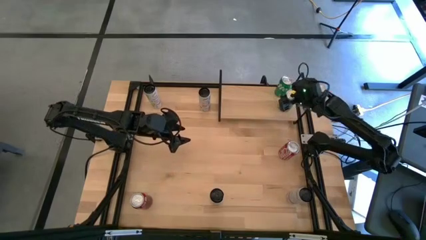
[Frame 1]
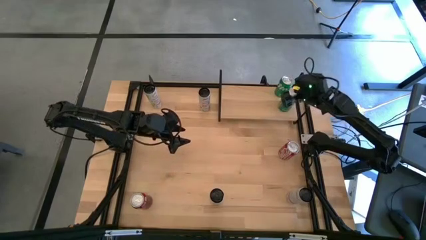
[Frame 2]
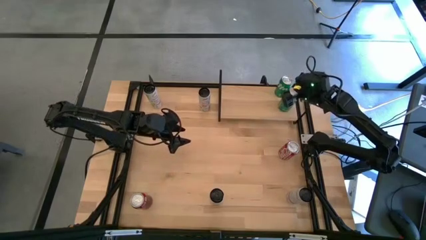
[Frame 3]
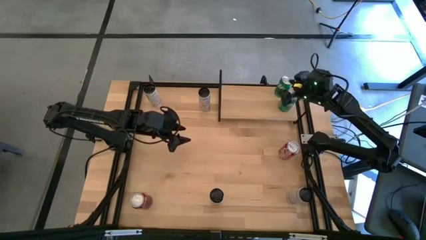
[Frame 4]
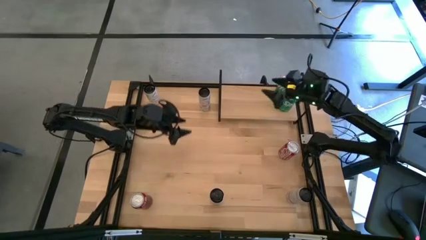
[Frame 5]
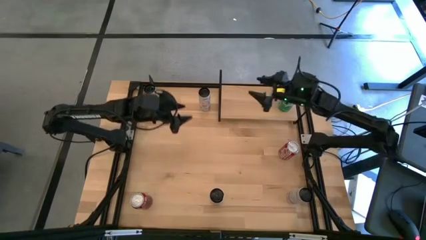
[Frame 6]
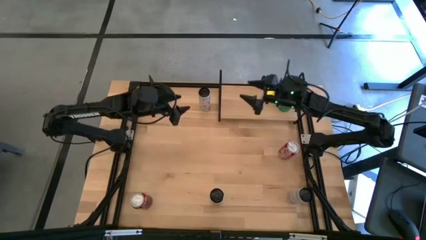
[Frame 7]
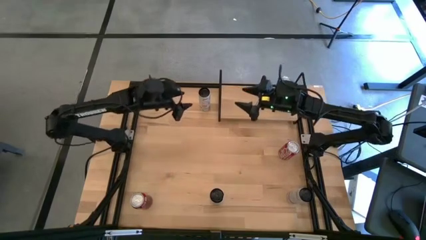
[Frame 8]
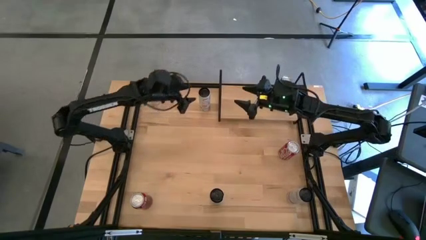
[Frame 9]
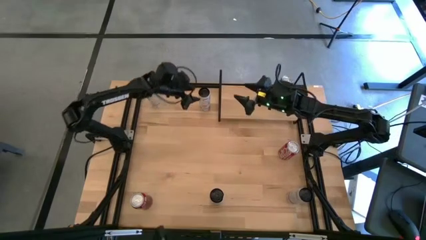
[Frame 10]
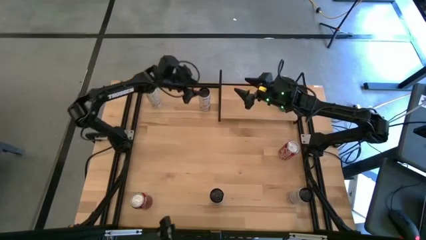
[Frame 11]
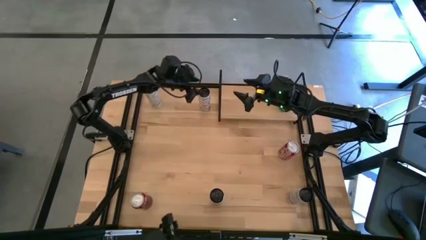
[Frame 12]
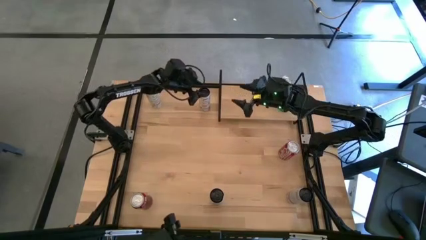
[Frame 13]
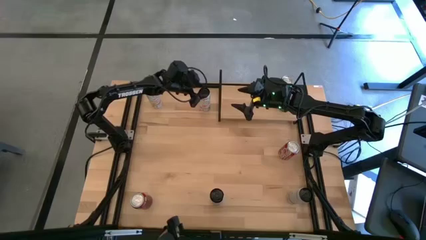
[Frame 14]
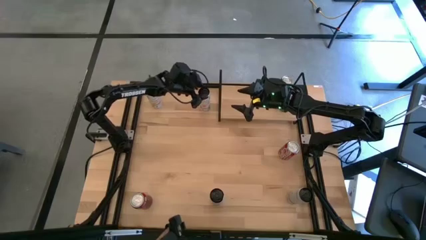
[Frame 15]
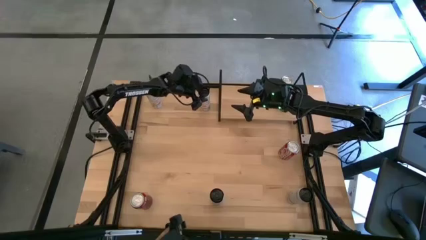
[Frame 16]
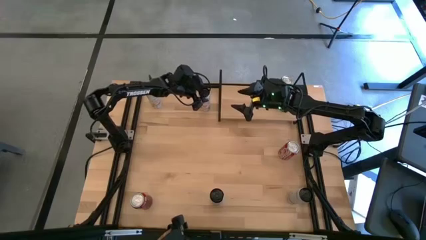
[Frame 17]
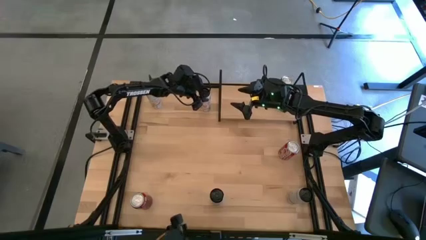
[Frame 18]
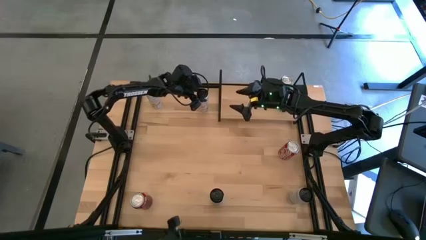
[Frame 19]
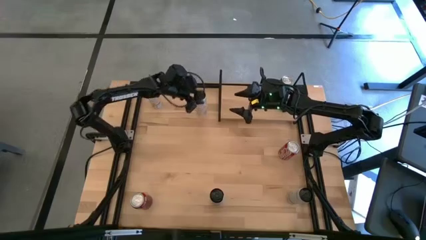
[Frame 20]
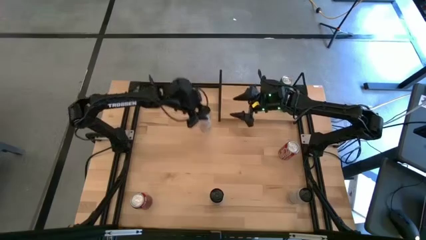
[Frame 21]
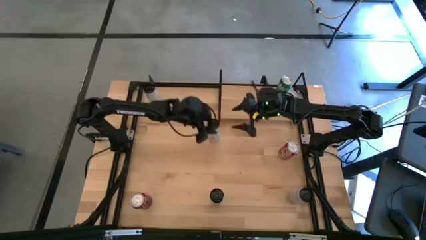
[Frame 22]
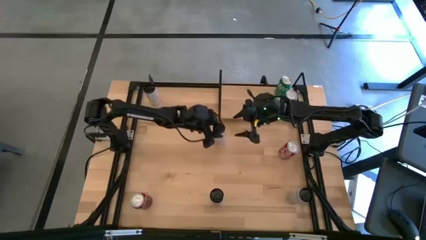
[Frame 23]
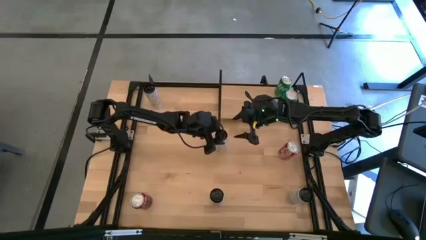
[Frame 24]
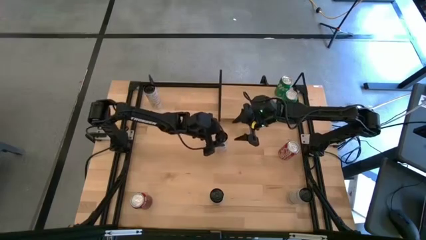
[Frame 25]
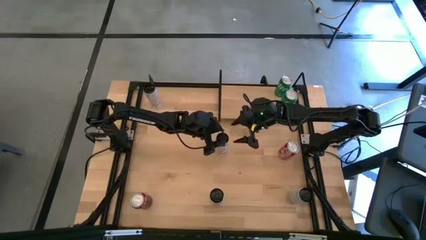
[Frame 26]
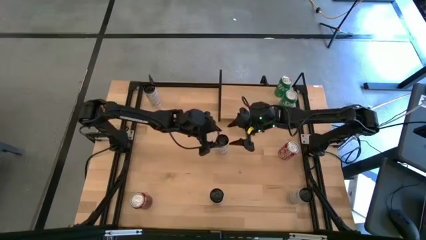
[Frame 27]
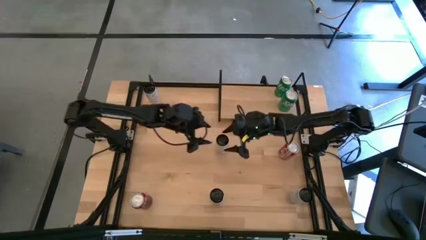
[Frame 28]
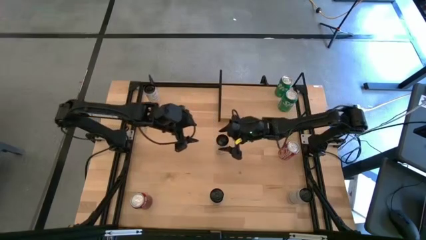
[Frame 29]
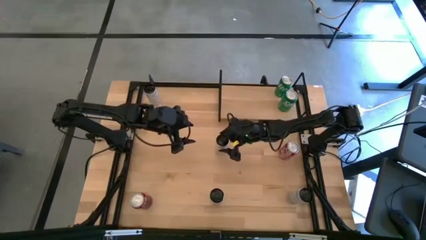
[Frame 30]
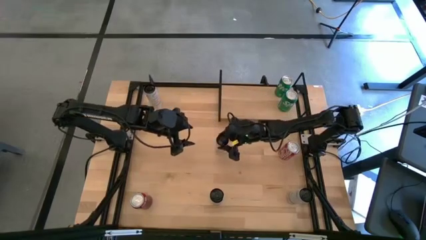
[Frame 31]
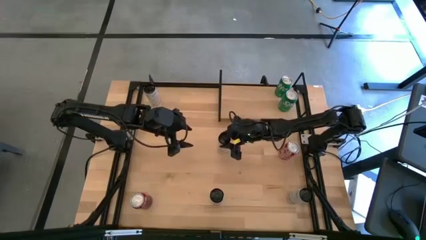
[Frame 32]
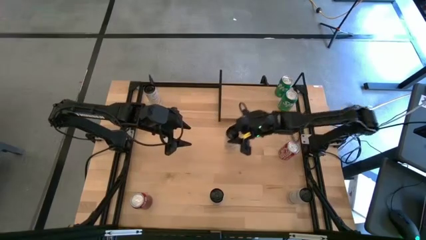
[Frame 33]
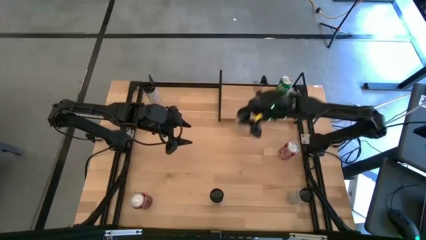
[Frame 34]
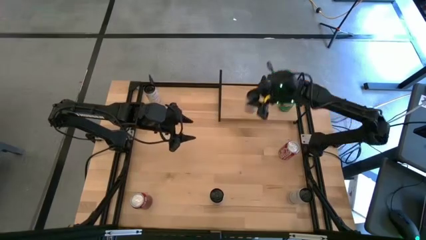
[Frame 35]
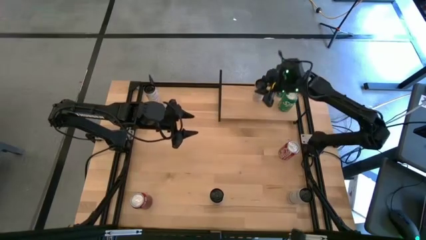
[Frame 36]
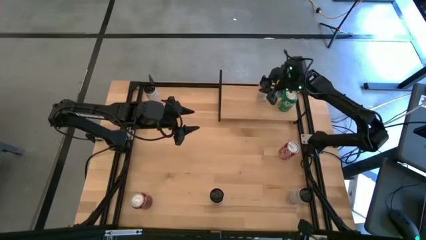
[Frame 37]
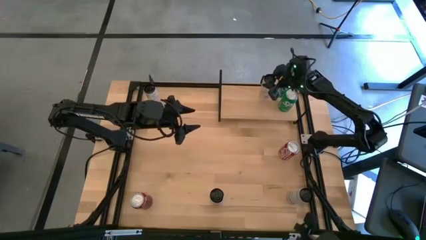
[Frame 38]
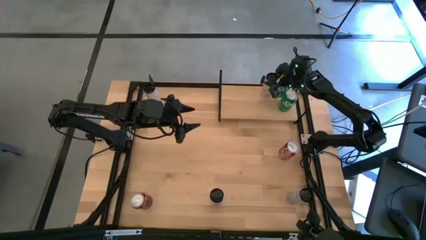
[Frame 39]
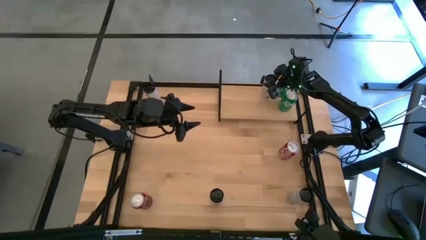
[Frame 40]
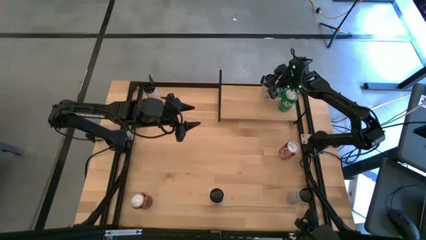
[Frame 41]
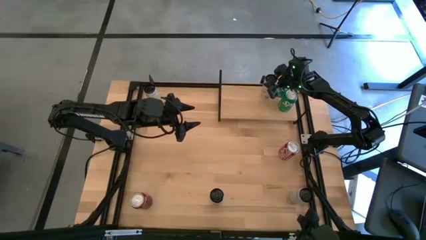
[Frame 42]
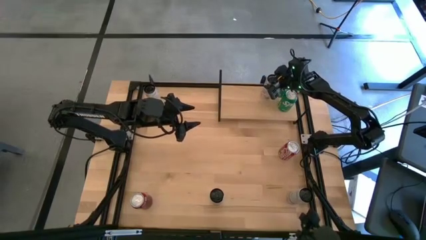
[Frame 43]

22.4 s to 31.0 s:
Task: Place canned beverage on shelf
Put the top white pink soda can on the shelf

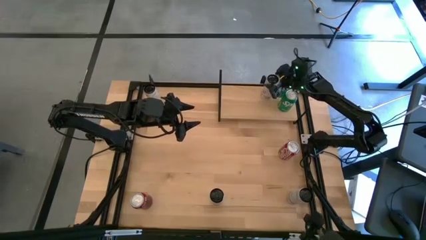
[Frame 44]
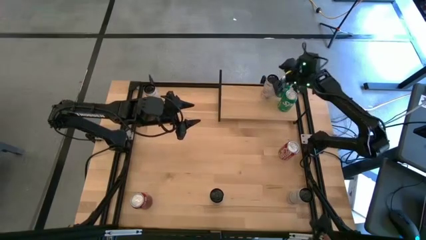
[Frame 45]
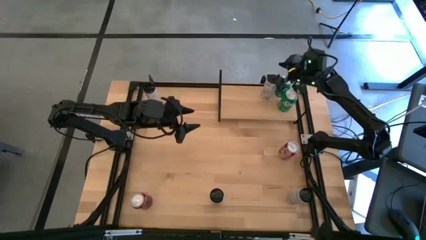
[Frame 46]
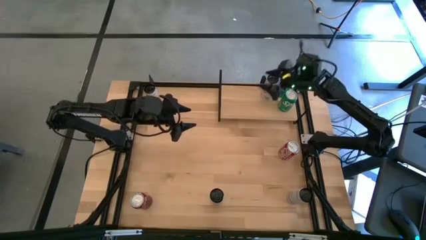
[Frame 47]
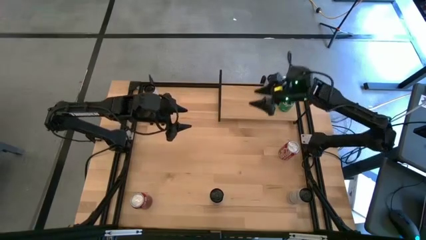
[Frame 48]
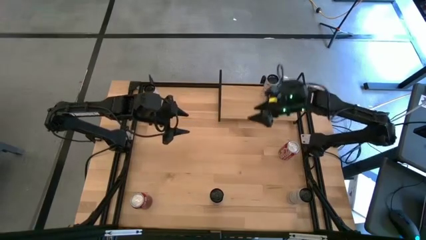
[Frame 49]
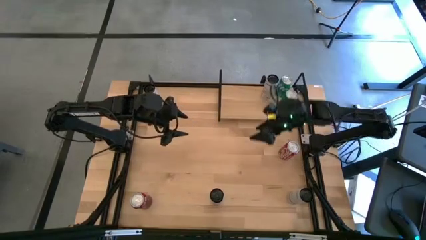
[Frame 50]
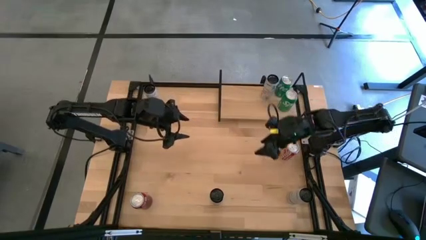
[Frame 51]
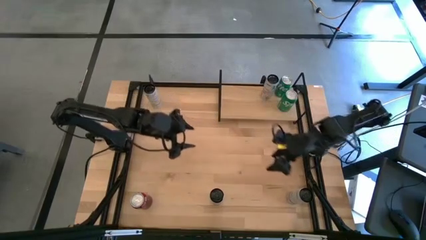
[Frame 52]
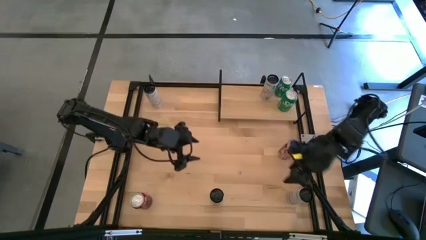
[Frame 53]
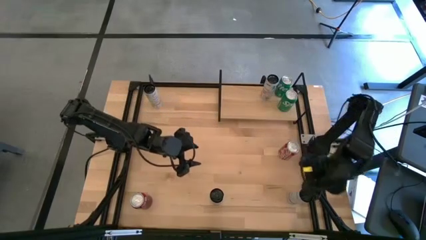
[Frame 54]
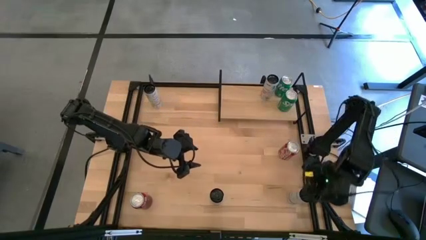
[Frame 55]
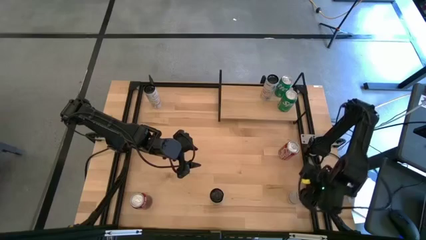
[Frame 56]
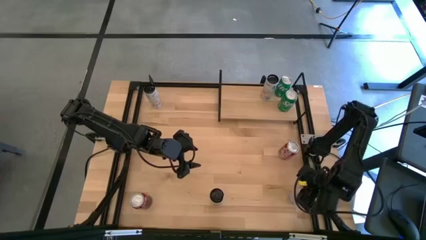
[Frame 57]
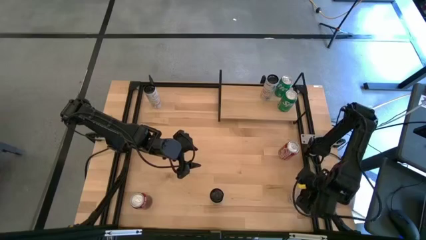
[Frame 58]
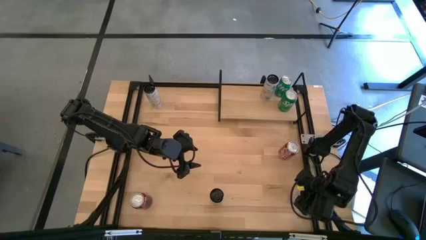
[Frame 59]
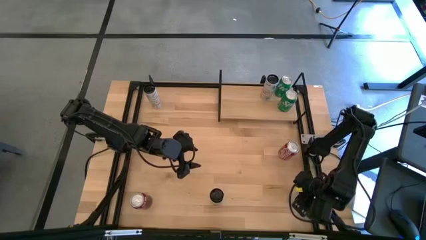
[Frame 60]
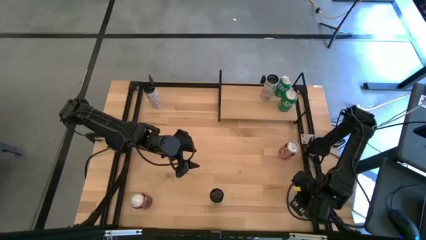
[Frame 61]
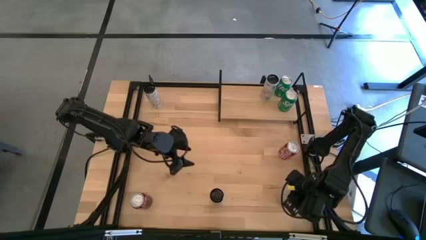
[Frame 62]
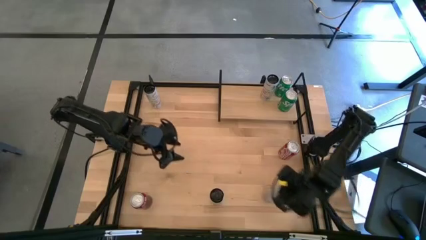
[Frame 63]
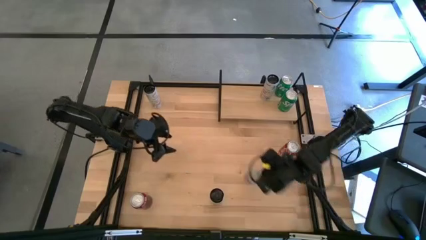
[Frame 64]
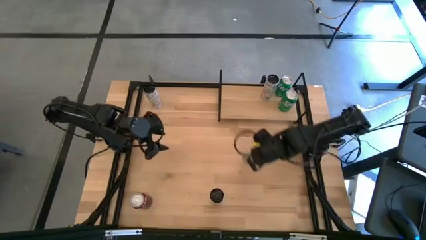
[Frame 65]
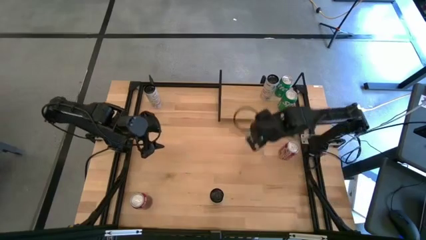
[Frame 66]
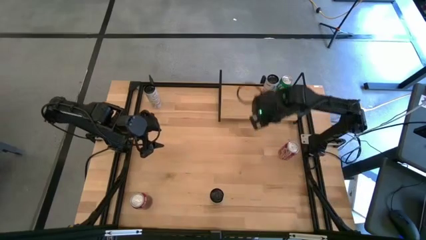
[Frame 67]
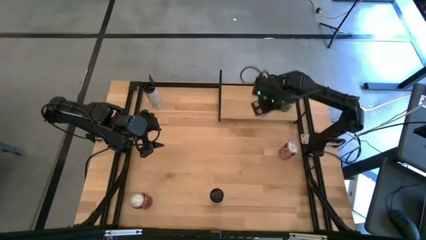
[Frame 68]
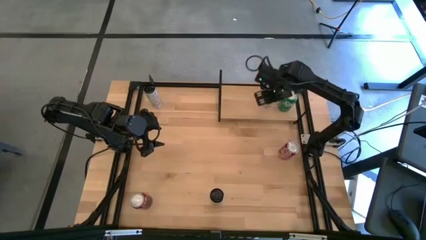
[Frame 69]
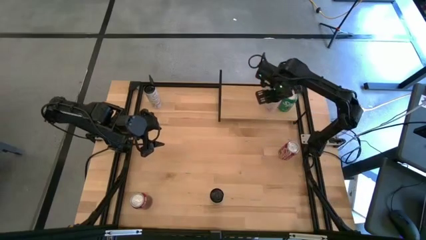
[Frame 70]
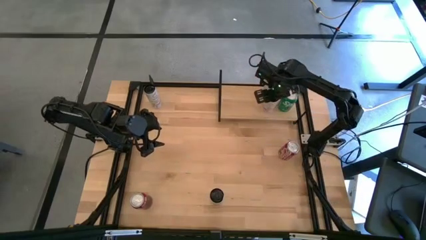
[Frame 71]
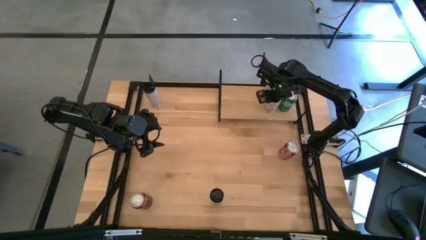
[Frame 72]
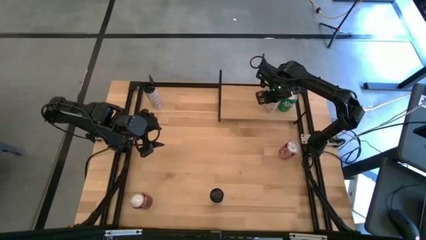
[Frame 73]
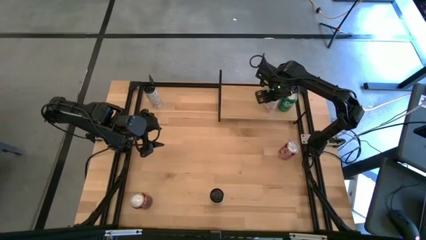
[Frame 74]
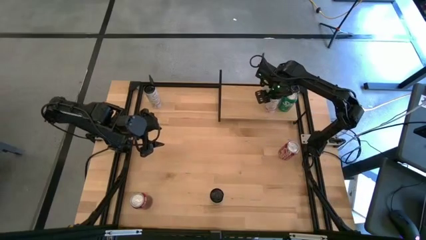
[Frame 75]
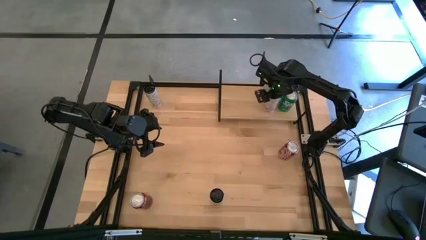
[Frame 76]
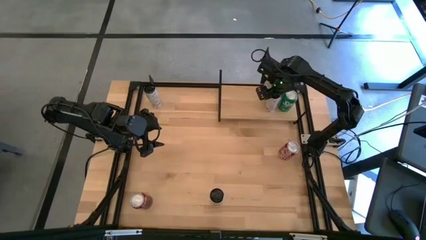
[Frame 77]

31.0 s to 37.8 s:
Put the white pink soda can on the shelf aligned with the other white pink soda can
